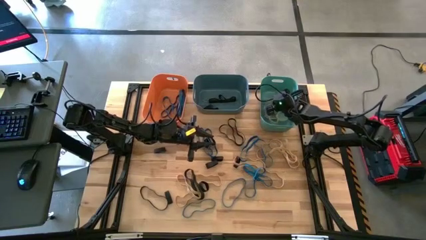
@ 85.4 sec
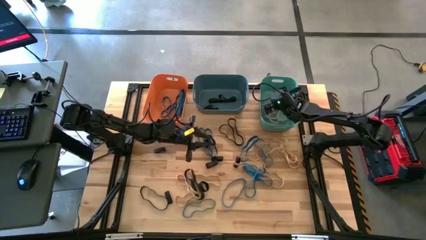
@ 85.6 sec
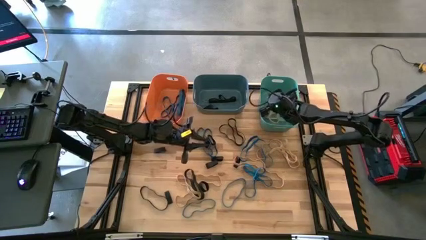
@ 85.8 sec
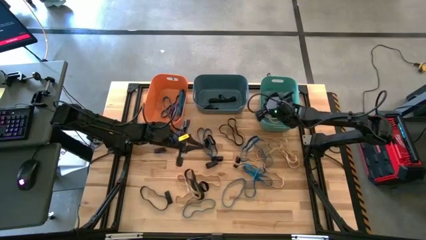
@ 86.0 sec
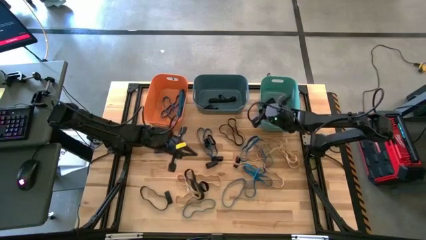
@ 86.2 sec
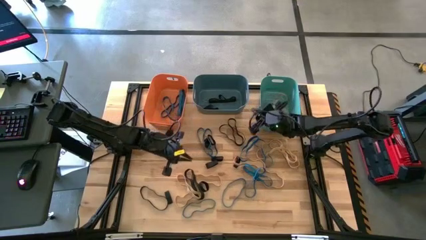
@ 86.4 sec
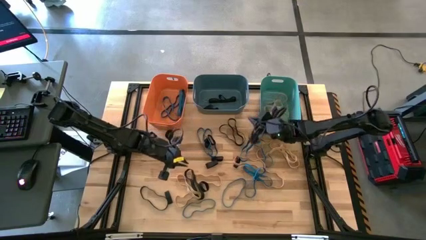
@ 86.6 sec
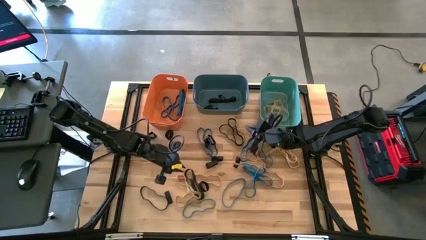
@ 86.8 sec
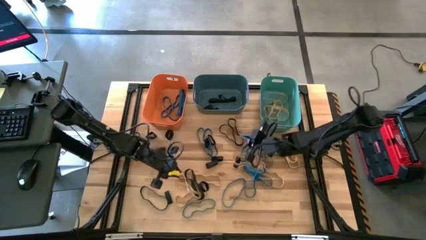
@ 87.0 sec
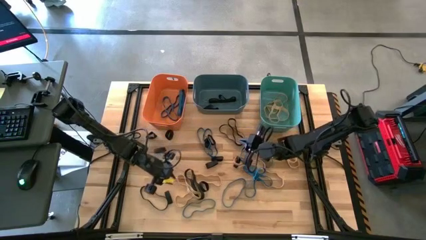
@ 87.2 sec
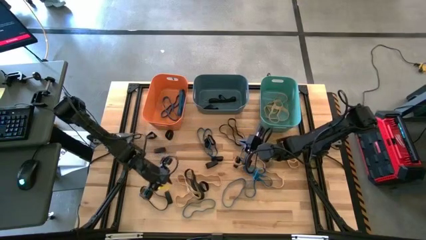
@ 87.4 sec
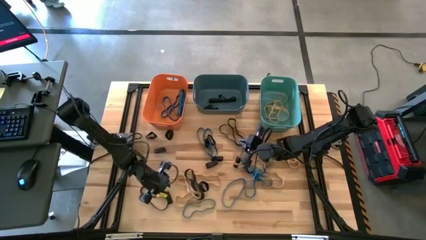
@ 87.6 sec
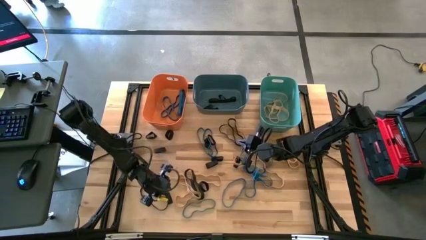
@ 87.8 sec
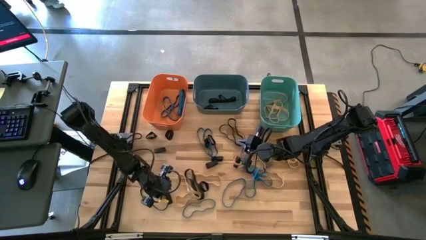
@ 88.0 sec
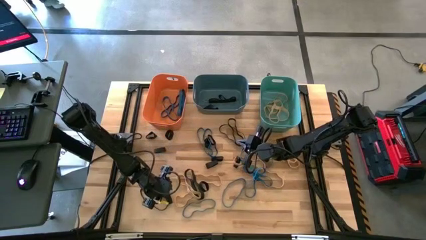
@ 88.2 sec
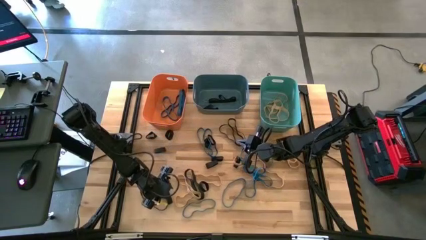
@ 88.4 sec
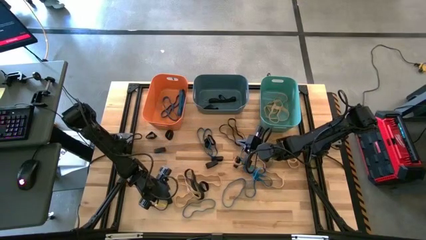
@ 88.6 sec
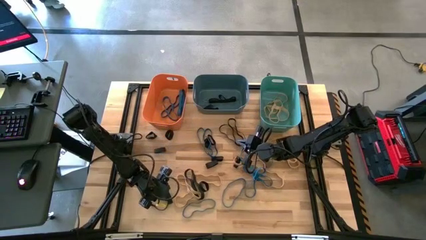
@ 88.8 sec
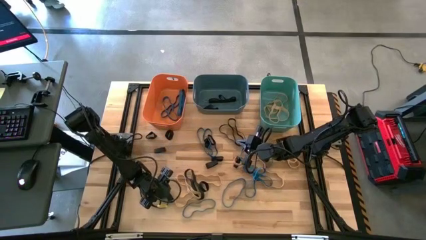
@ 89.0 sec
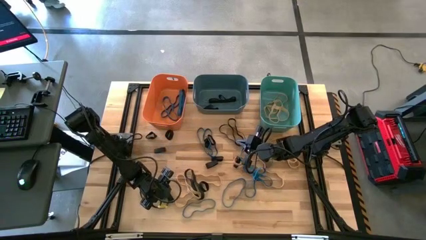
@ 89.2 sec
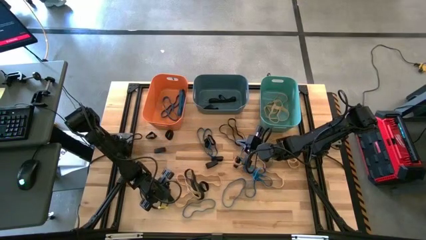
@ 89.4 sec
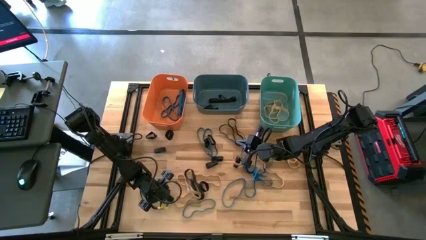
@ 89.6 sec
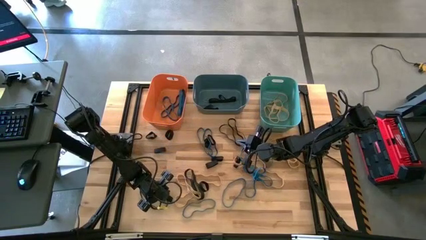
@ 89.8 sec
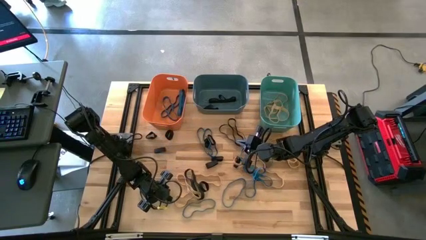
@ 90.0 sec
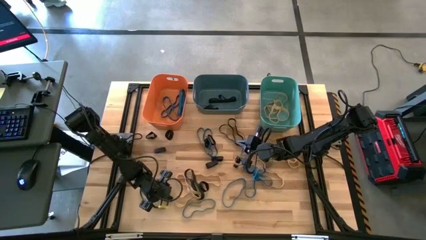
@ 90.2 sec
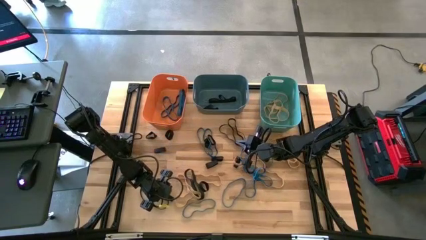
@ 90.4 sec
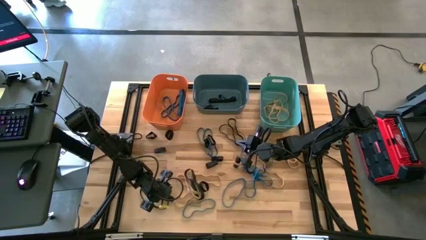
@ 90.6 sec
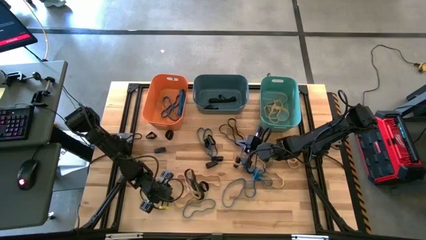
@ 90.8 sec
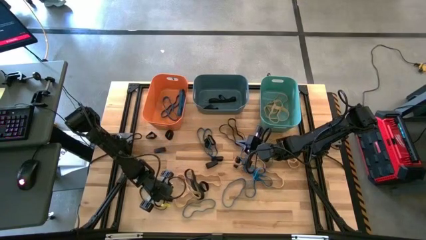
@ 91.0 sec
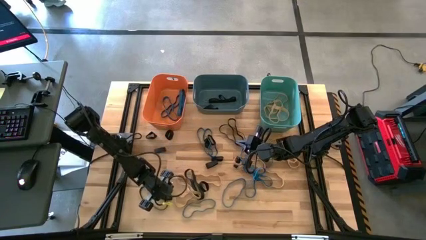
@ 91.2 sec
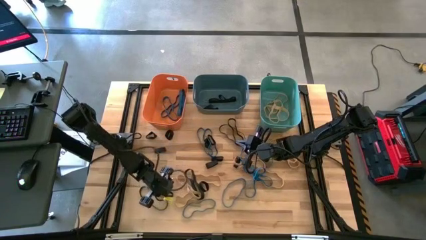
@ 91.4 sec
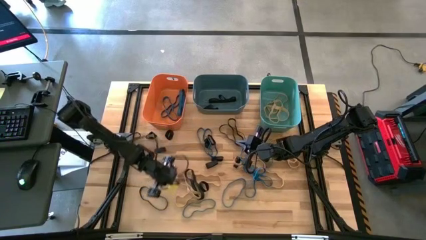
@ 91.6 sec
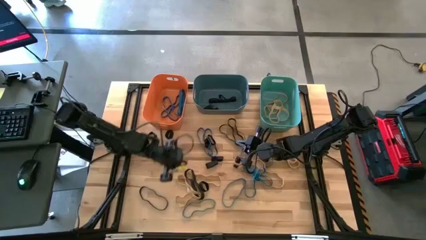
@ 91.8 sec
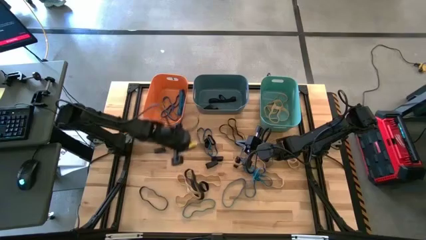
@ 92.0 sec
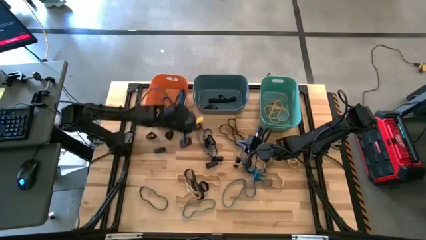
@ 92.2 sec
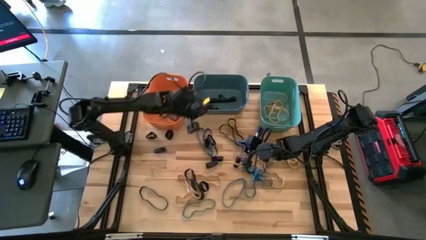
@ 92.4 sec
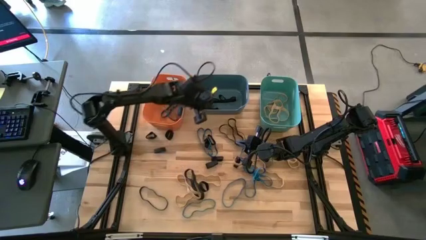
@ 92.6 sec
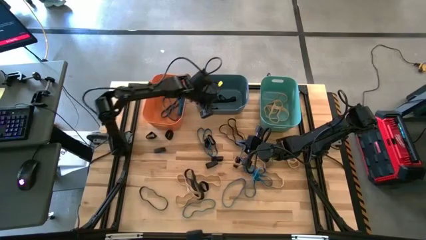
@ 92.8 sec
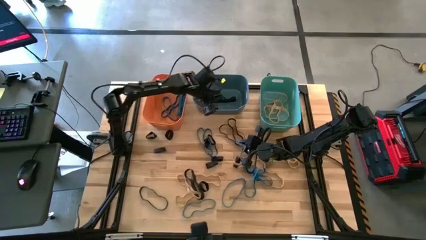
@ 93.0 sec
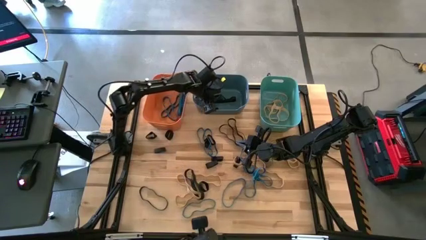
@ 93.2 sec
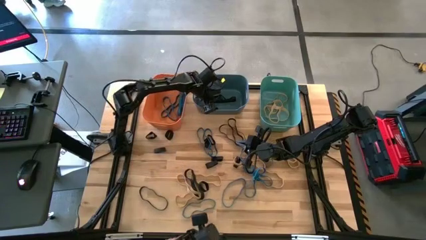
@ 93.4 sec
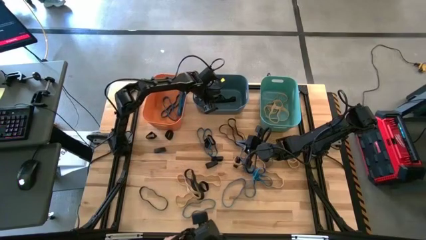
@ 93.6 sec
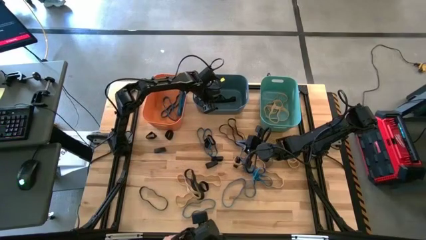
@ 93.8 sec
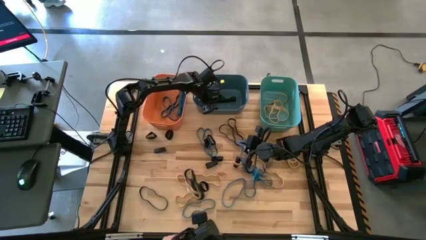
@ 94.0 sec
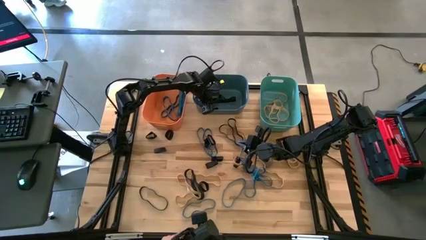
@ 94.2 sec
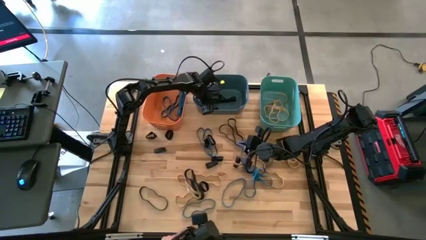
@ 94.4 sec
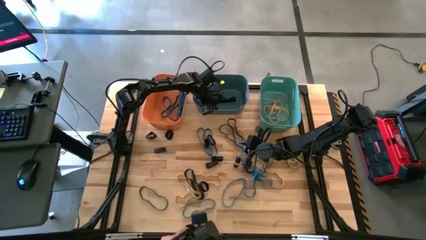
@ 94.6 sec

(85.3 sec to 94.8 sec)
Task: Sort rubber bands into baskets
Put the black rubber band into the blue bin

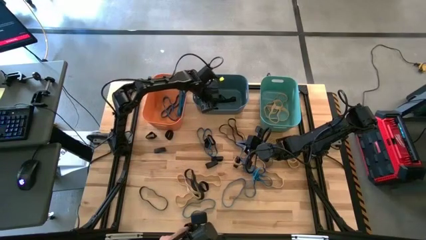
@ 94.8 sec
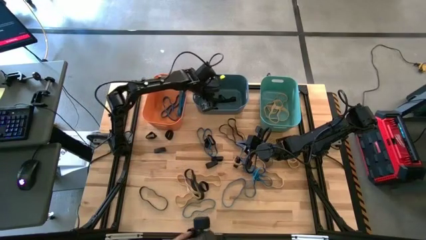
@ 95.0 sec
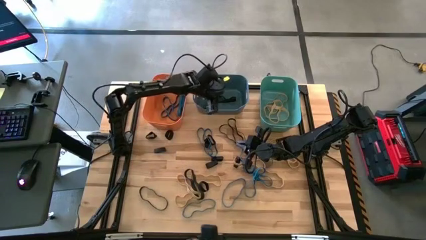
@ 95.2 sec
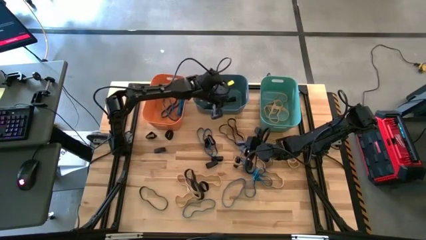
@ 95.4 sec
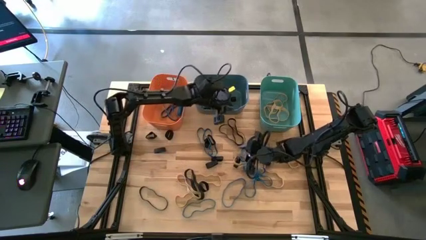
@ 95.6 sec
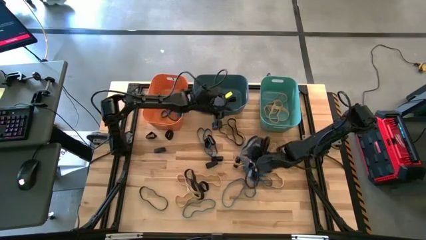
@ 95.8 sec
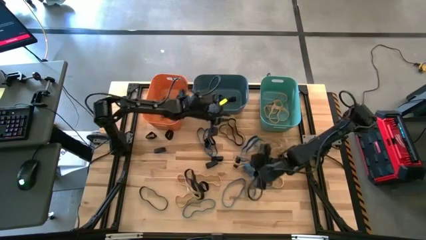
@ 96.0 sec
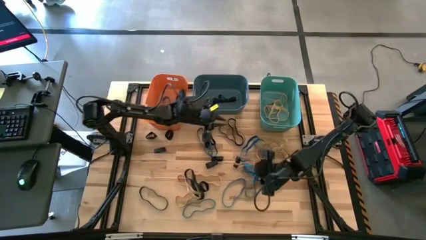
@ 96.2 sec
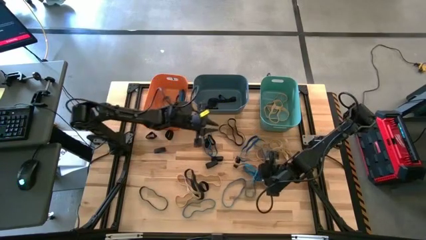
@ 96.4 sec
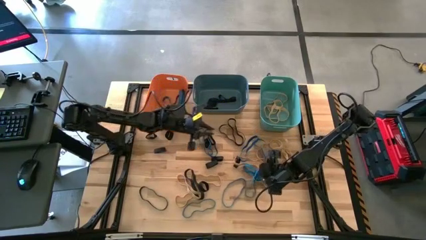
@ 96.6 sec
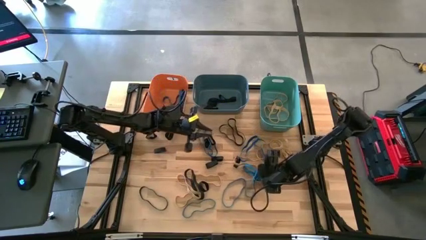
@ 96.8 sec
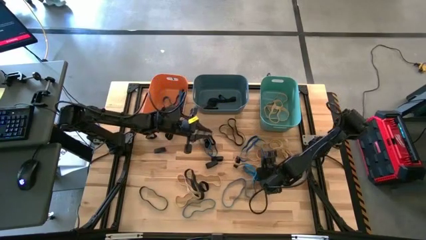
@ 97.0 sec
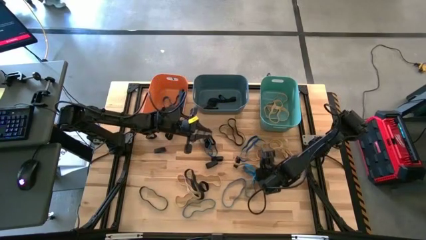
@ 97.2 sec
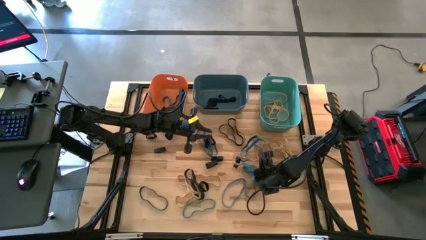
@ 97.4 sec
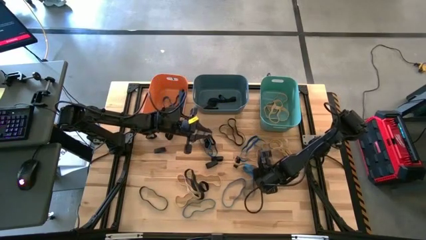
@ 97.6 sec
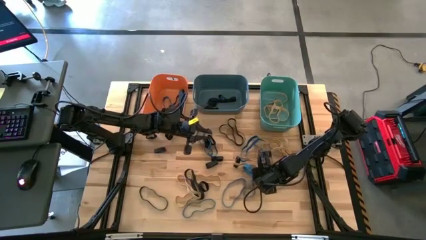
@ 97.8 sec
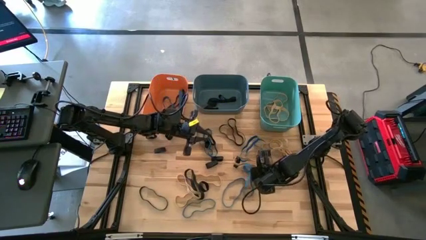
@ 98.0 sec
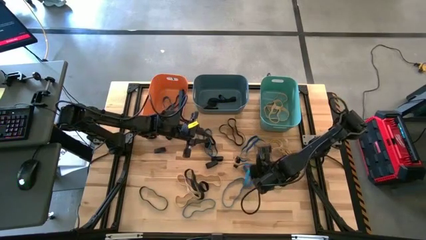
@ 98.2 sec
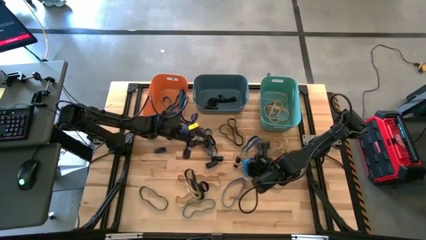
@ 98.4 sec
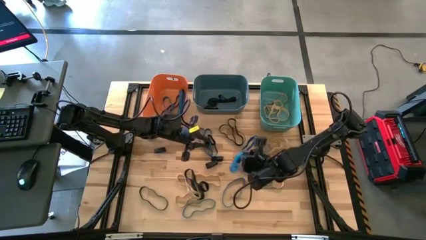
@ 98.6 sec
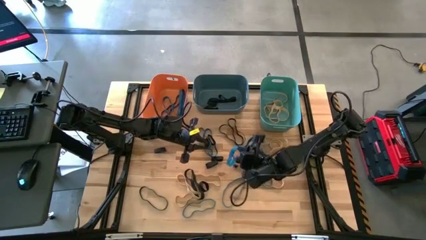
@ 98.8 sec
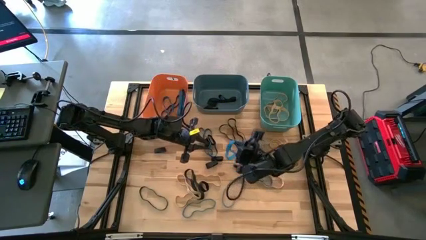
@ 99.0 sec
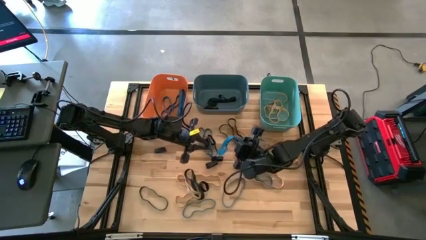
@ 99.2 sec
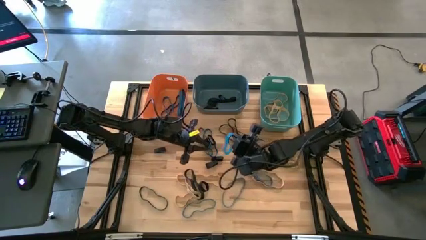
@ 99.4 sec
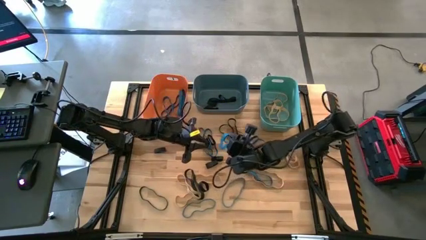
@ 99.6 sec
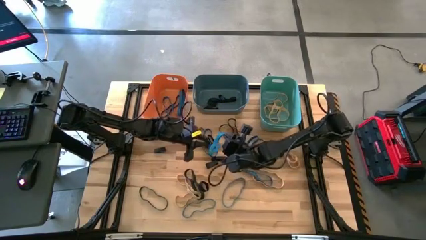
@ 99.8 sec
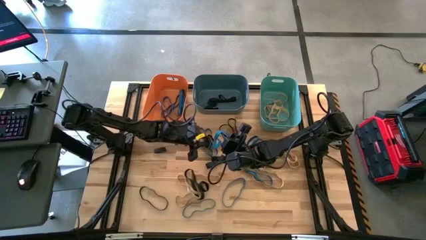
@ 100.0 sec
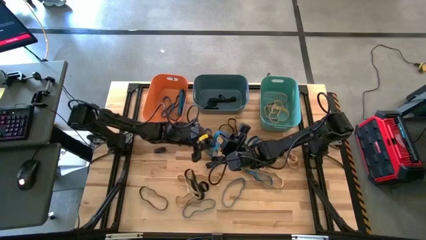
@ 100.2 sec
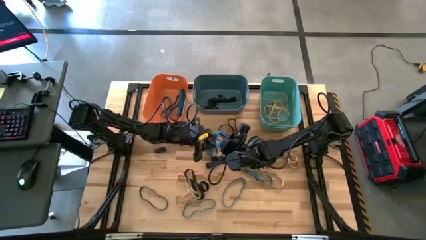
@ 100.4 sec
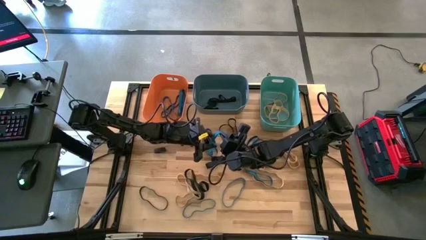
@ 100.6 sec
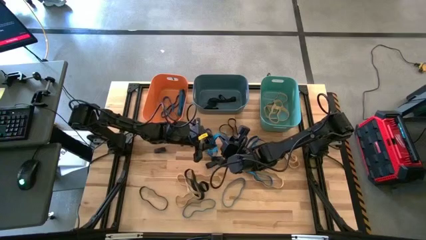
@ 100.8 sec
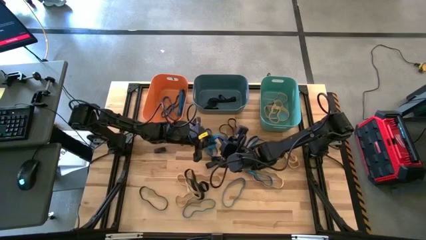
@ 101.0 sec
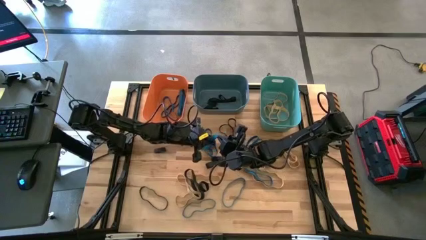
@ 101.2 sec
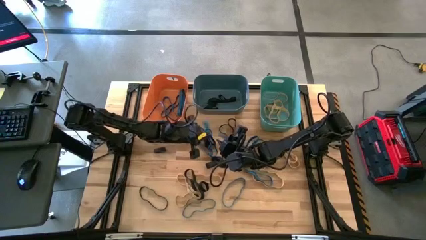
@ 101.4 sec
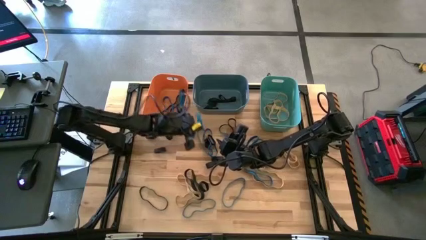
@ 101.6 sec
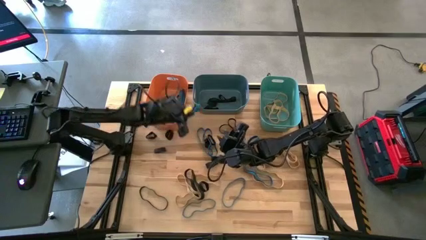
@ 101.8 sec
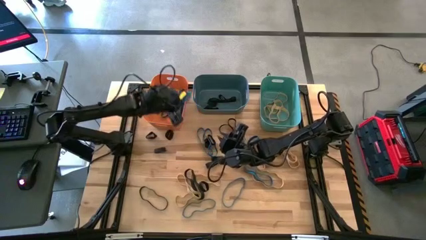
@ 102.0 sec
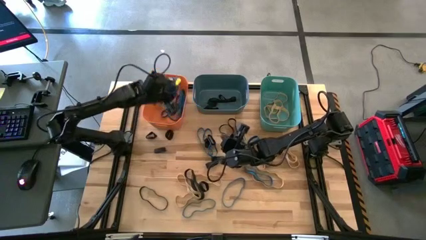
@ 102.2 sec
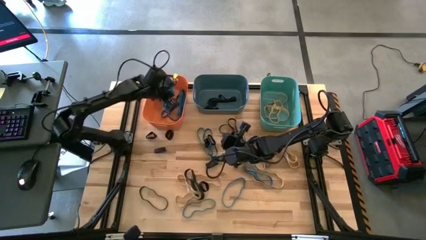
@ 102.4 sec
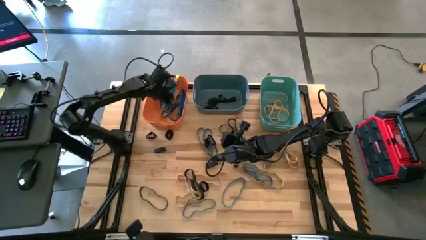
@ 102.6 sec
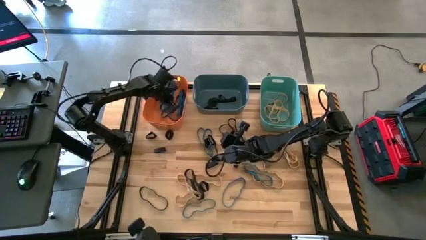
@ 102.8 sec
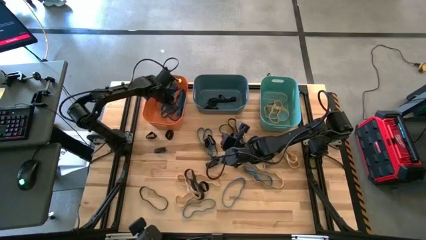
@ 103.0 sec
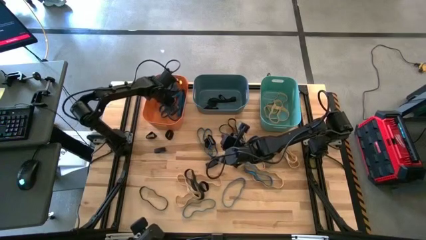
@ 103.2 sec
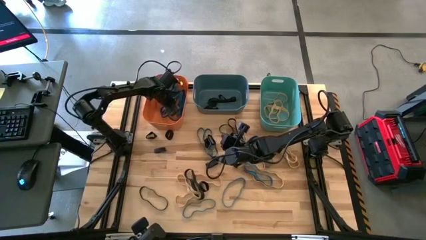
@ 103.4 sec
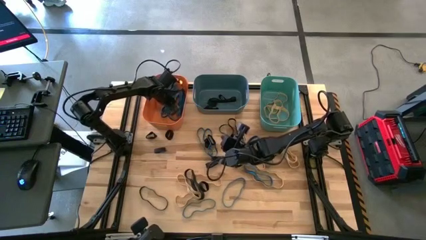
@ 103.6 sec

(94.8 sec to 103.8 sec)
Put the blue rubber band into the orange bin
